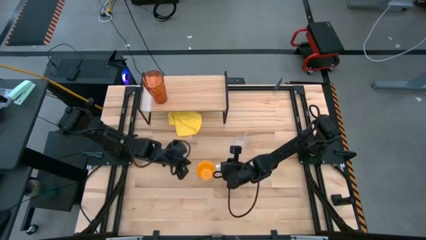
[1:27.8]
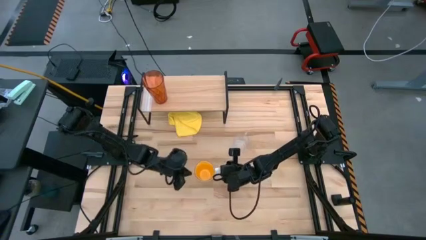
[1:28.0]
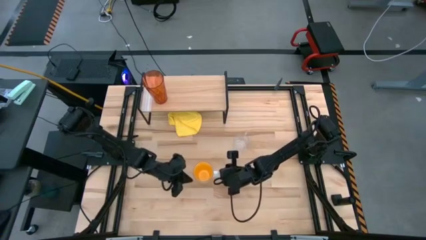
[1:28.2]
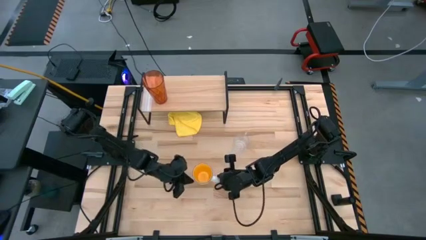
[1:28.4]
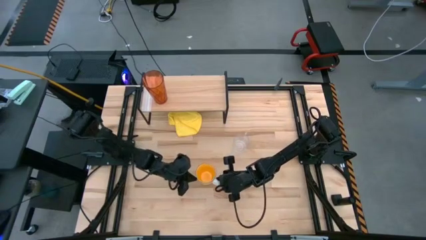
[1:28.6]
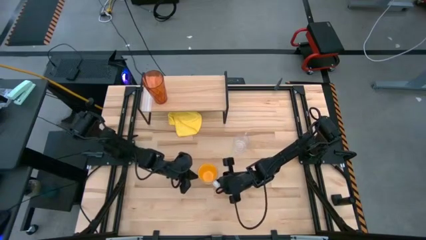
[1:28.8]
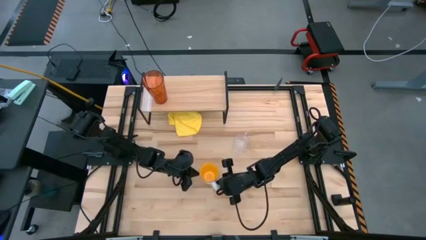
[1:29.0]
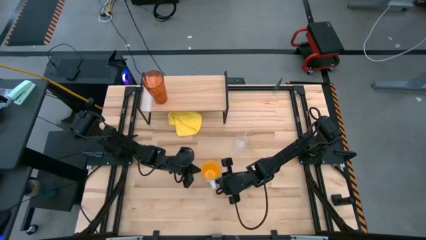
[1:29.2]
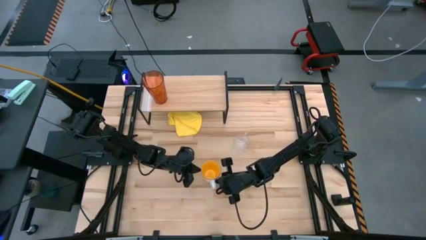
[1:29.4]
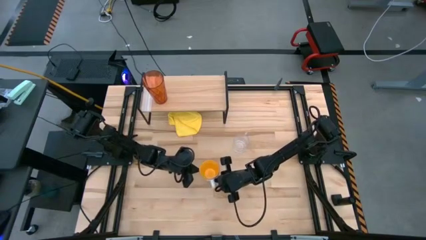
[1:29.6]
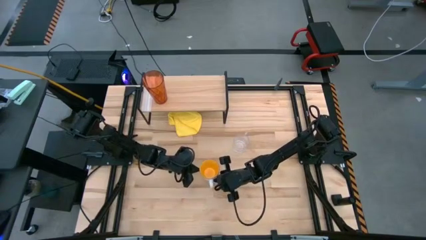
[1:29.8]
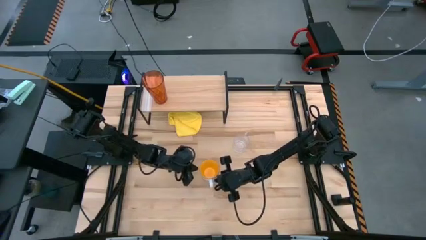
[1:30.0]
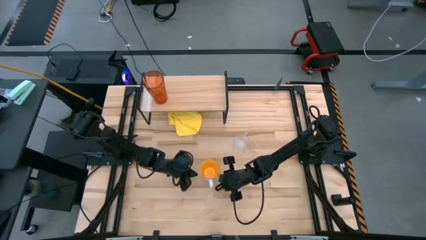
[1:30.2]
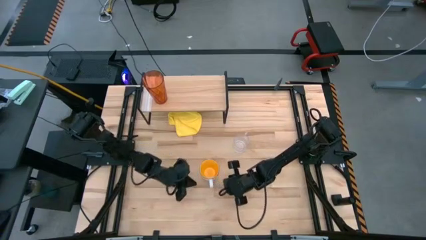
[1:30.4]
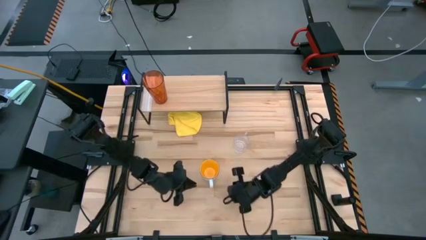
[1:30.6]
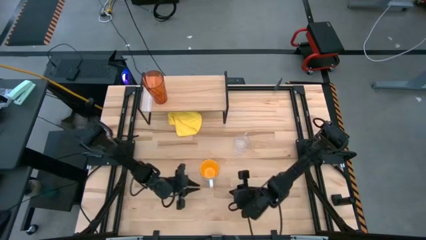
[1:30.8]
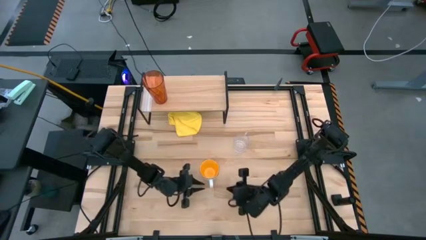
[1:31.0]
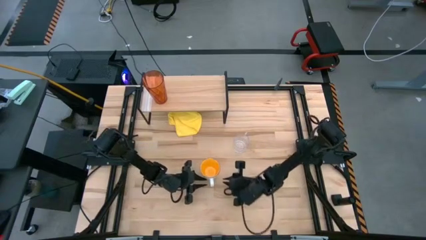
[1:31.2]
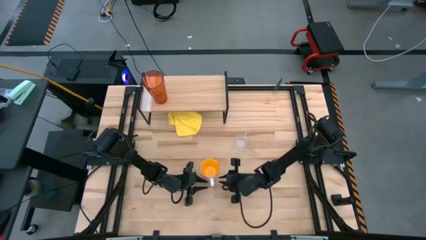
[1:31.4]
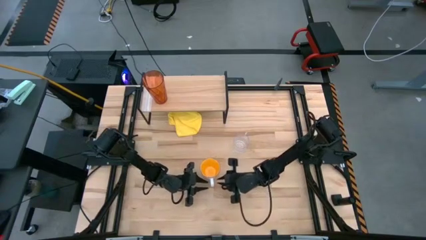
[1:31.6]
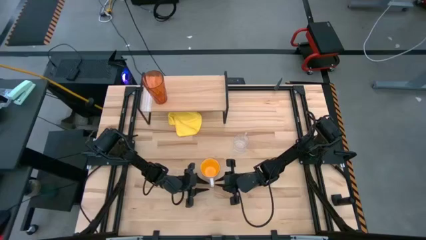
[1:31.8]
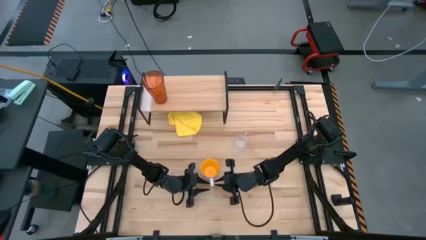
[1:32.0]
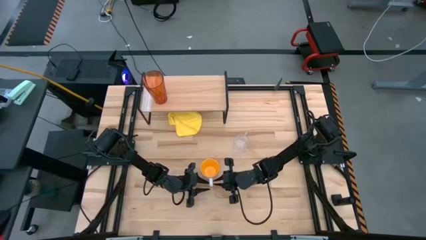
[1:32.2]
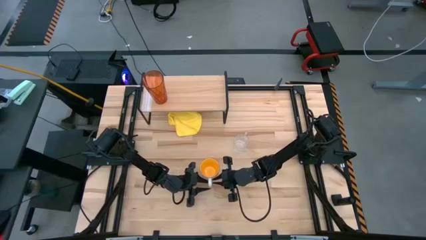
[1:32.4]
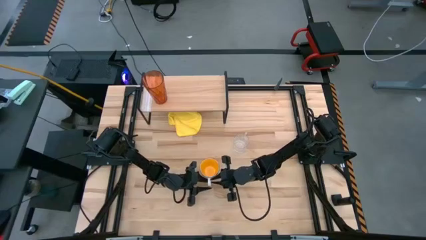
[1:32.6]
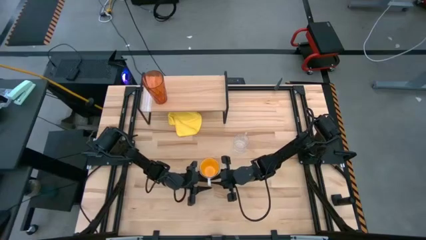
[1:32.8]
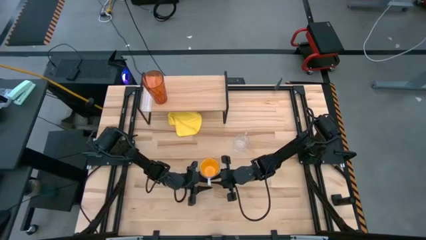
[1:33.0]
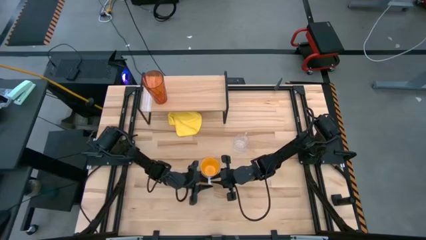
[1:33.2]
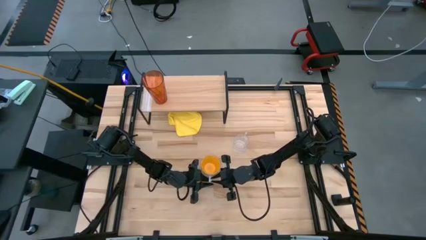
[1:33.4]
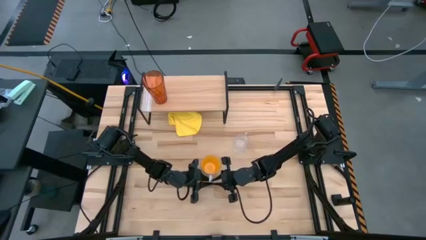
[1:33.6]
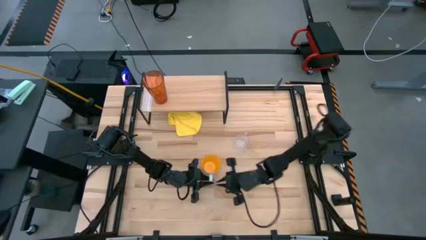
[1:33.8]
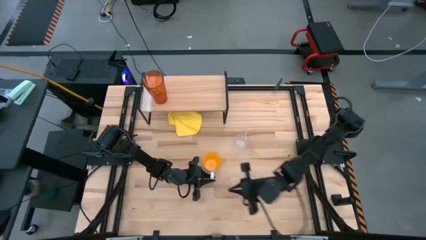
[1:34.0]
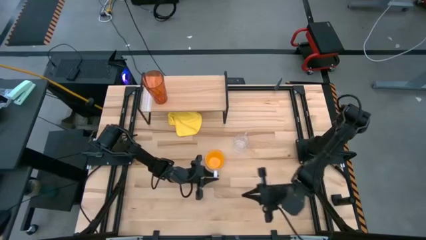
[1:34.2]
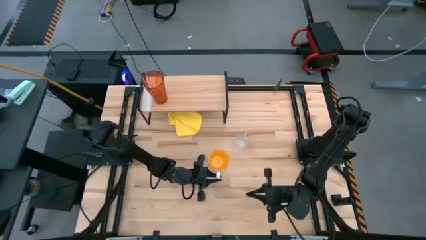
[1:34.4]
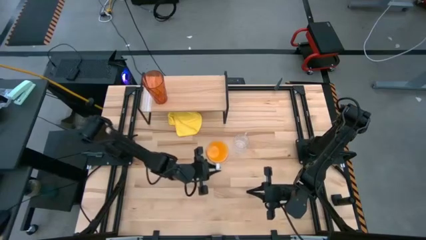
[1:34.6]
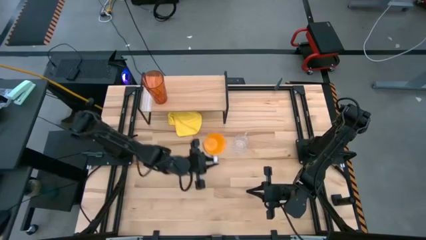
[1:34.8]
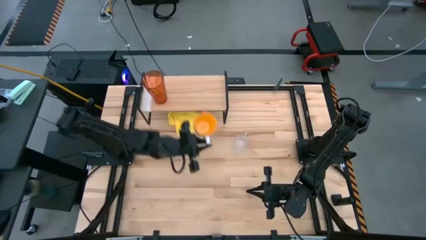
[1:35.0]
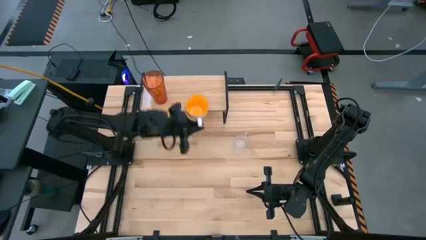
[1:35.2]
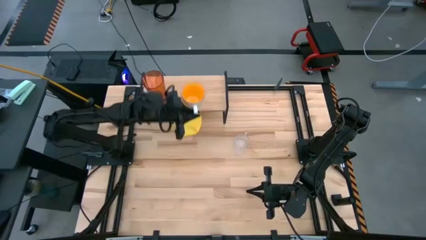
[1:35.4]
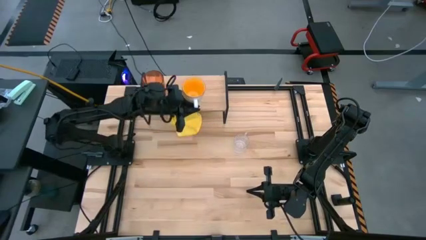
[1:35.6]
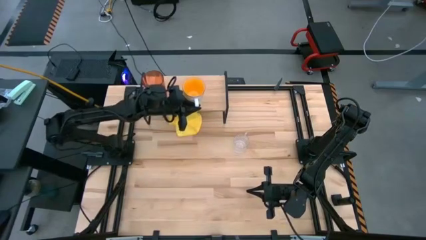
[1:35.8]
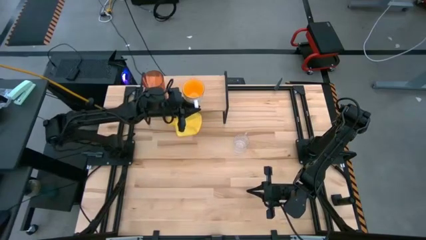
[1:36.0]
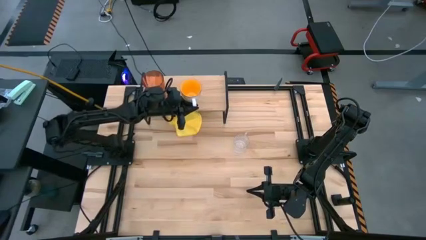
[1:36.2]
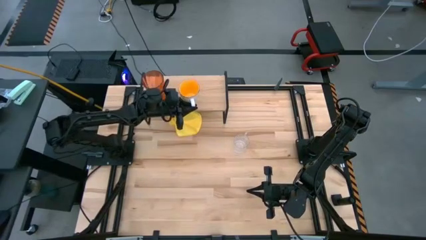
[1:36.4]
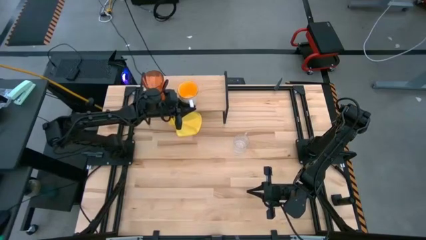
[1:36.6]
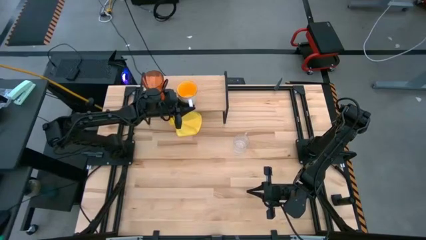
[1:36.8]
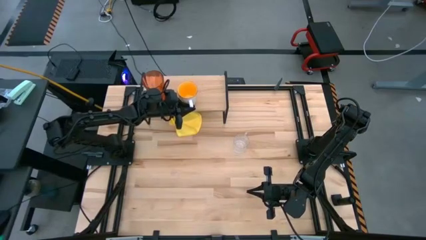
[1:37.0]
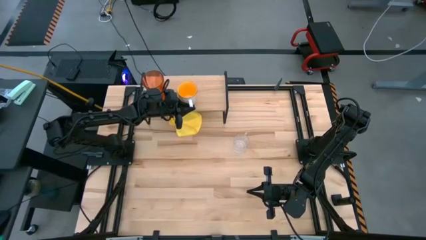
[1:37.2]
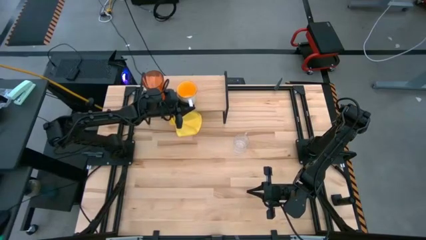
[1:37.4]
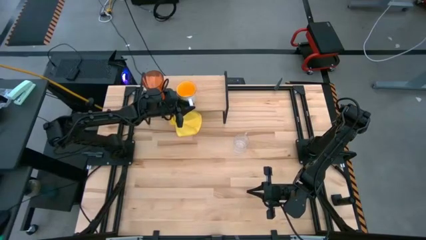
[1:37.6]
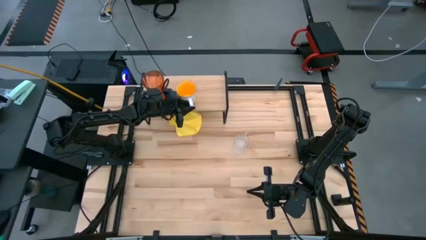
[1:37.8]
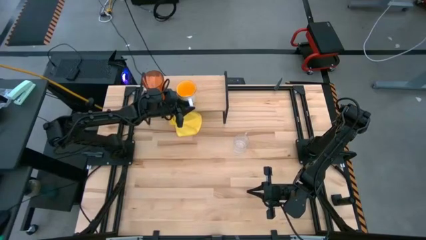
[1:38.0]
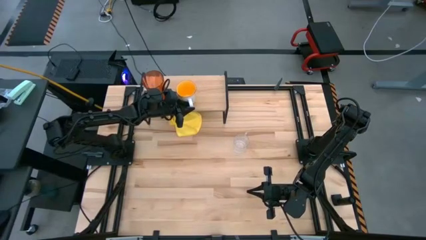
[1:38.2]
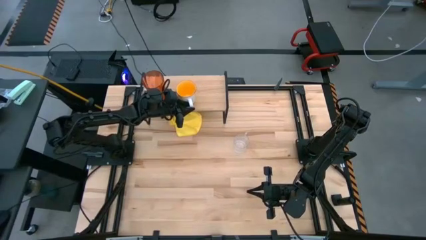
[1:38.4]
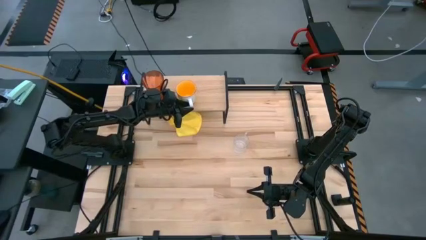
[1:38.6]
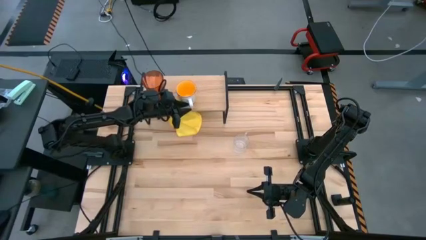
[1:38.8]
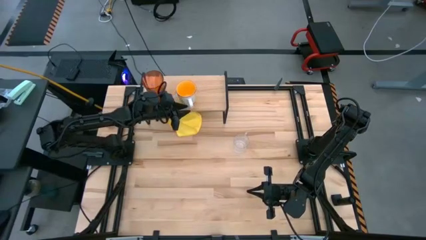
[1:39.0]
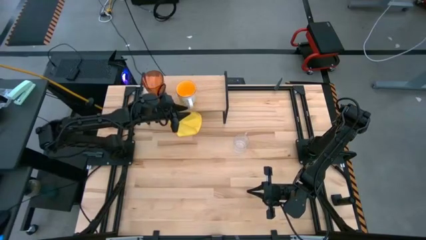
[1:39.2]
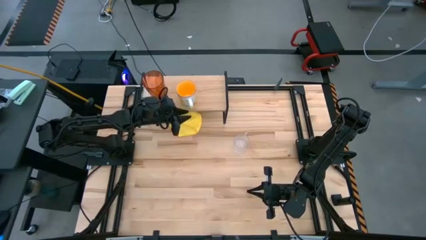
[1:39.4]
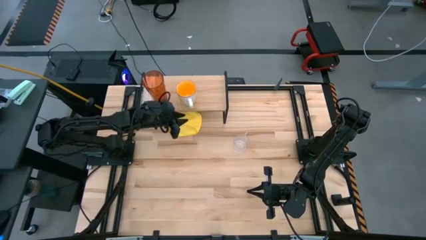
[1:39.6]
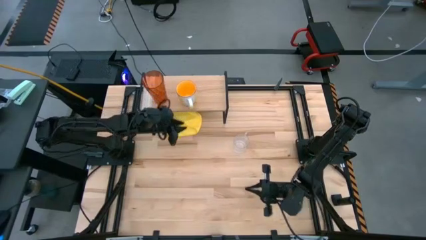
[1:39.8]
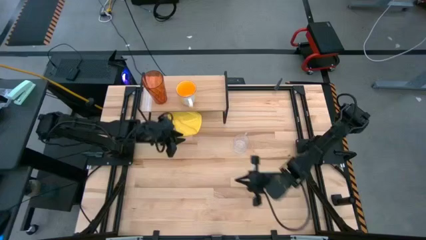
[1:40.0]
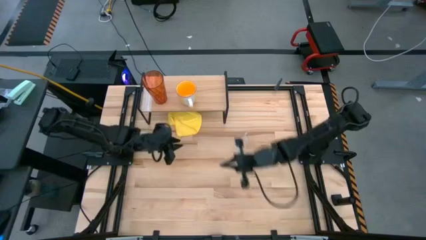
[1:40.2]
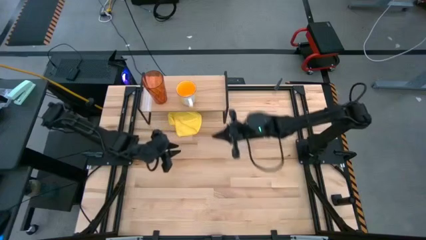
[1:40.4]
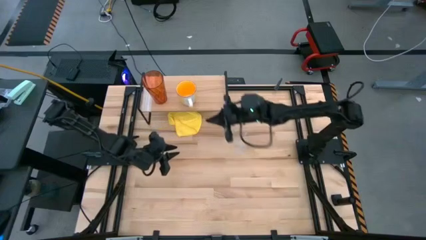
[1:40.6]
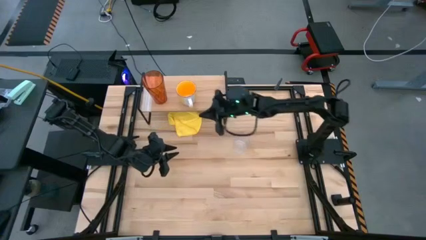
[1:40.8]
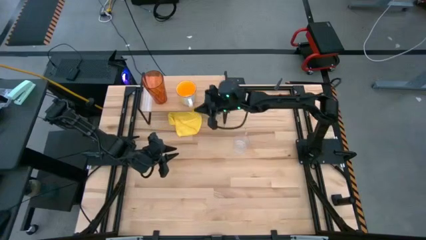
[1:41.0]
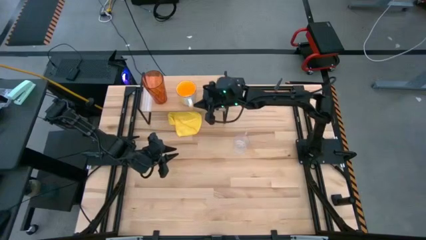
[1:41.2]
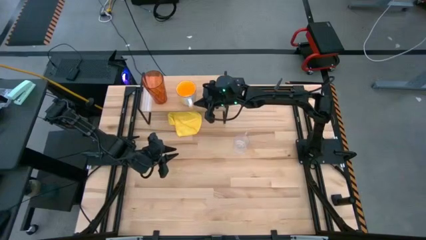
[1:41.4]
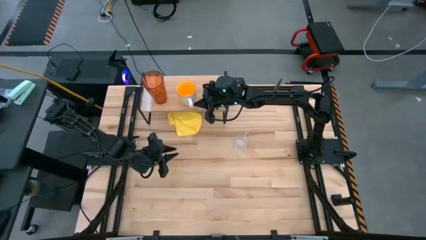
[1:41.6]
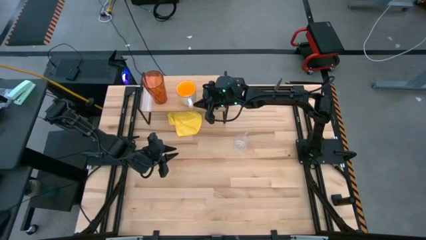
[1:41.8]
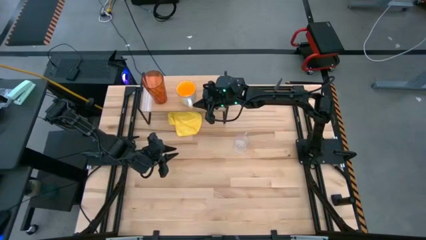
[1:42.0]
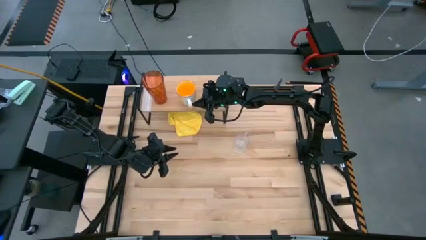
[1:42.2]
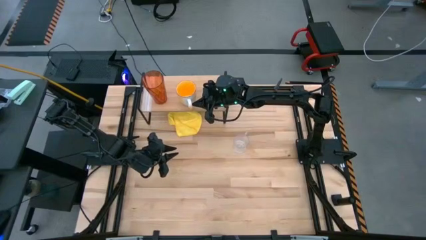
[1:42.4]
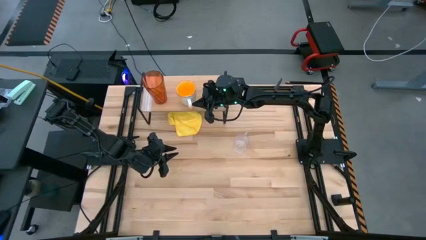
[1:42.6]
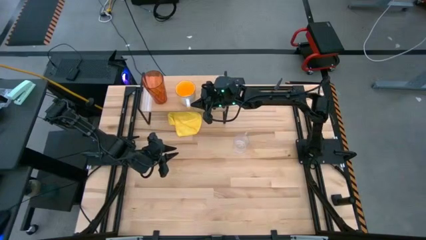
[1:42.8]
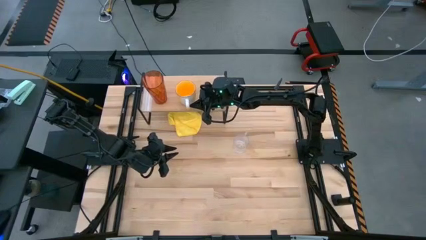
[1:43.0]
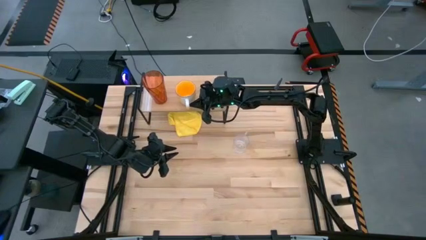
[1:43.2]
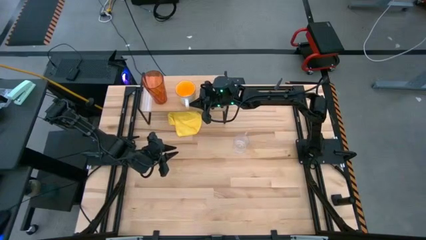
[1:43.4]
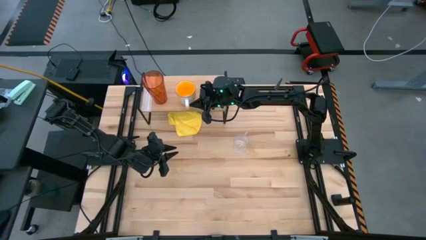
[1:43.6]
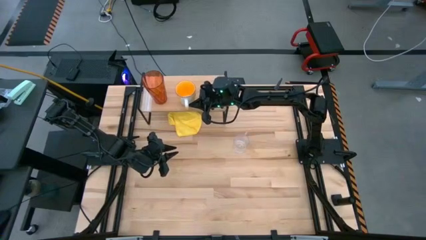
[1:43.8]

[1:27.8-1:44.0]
Task: Stack small to large cups/mugs on shelf
Put the yellow mug on the shelf
